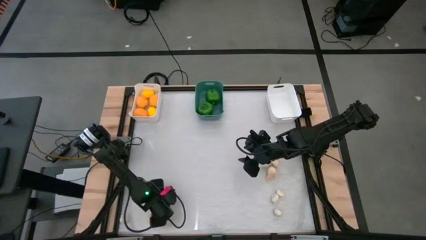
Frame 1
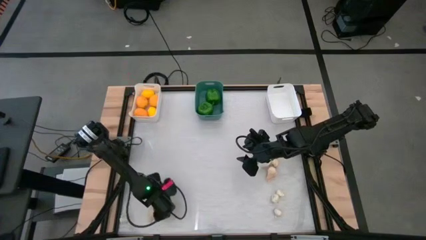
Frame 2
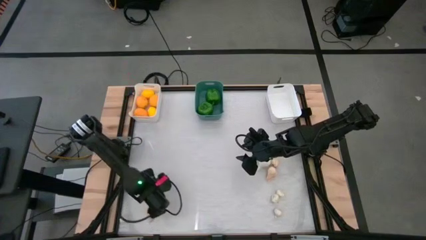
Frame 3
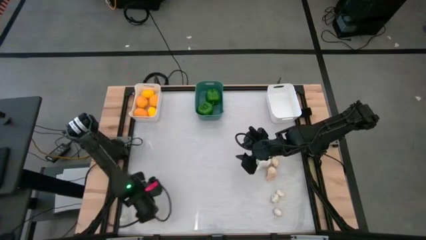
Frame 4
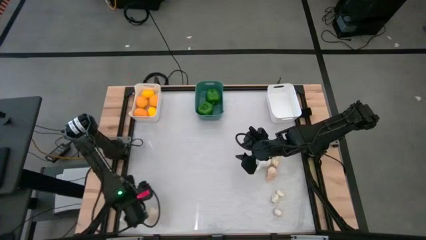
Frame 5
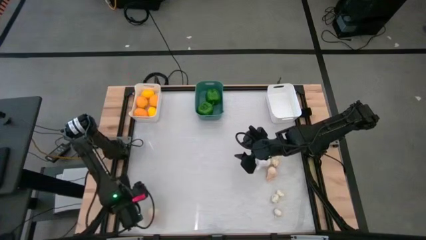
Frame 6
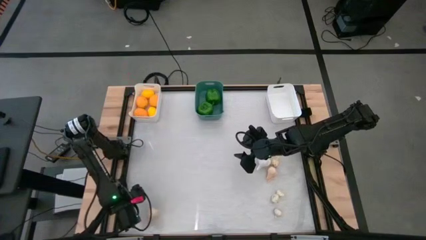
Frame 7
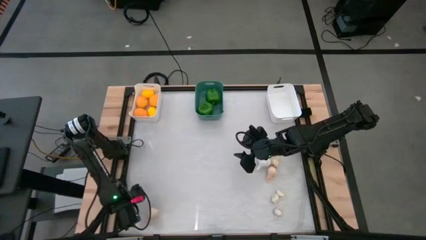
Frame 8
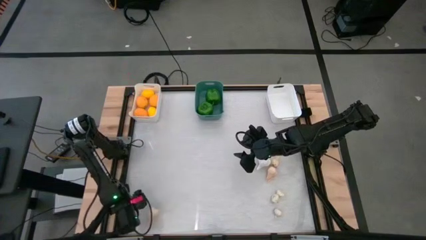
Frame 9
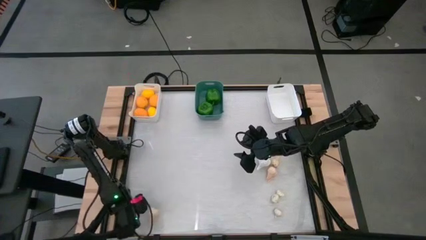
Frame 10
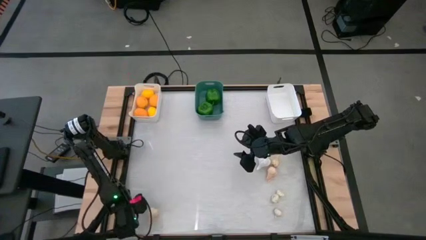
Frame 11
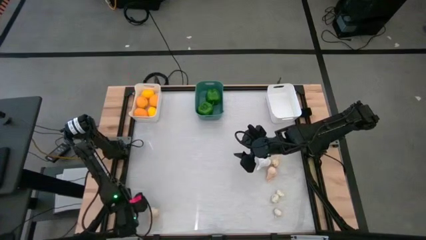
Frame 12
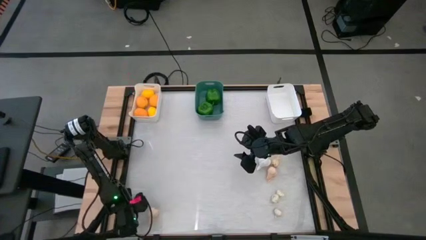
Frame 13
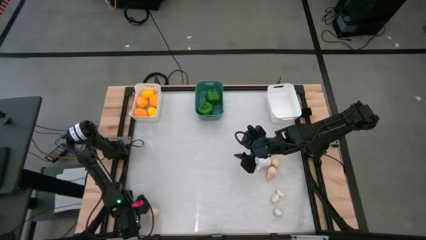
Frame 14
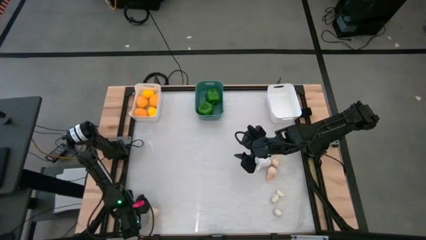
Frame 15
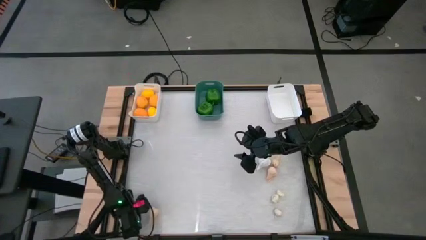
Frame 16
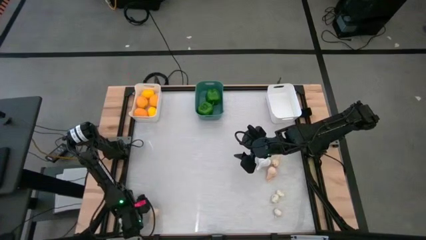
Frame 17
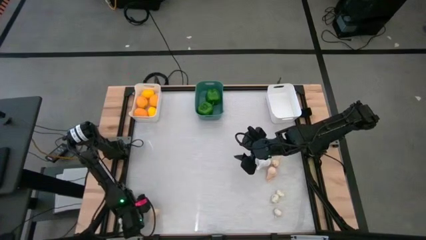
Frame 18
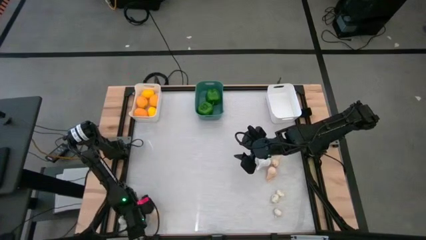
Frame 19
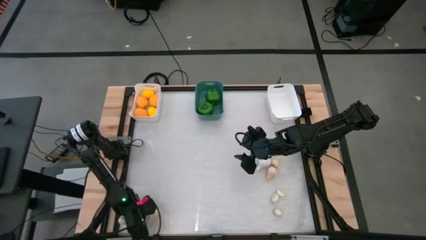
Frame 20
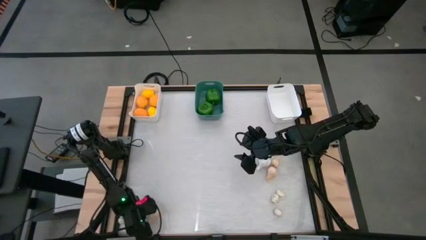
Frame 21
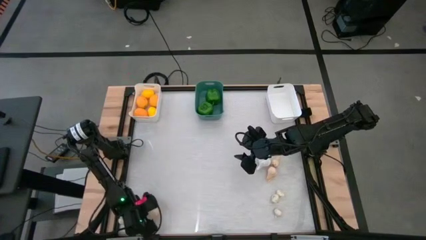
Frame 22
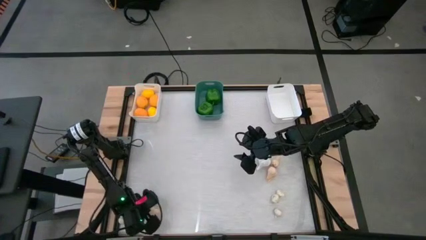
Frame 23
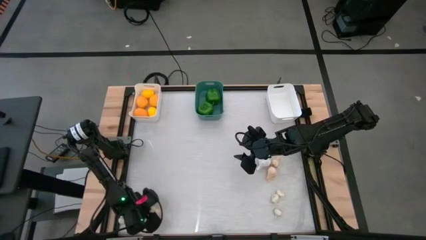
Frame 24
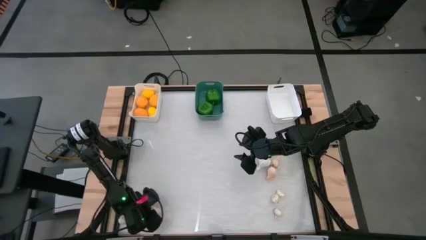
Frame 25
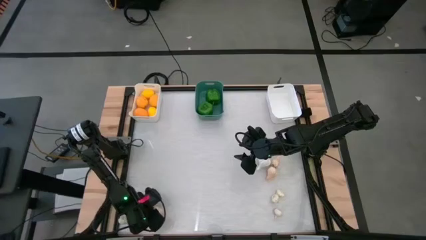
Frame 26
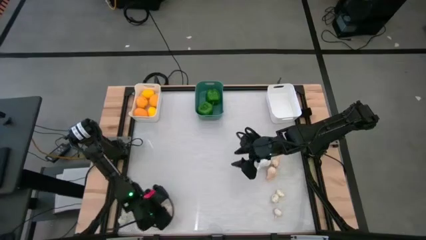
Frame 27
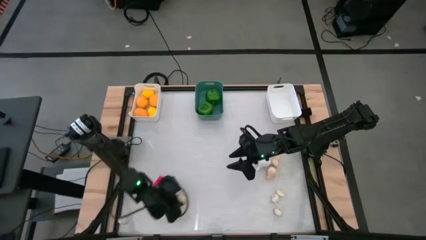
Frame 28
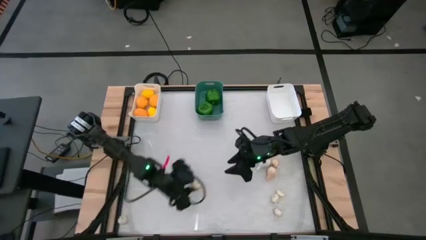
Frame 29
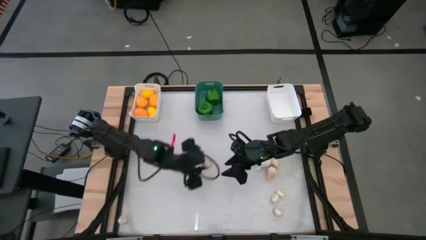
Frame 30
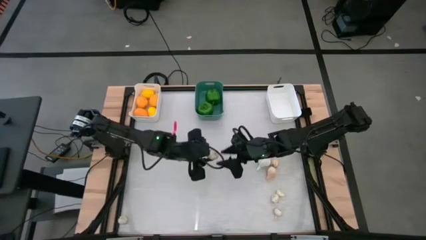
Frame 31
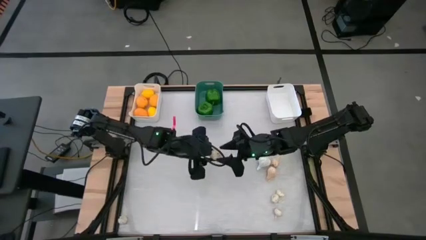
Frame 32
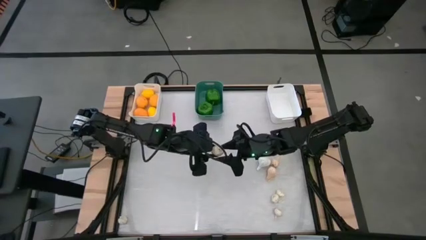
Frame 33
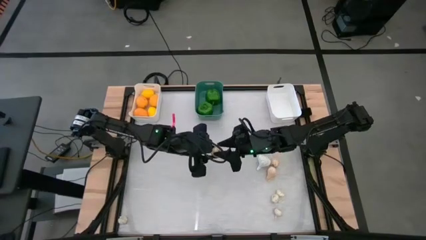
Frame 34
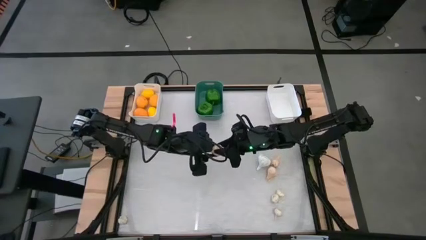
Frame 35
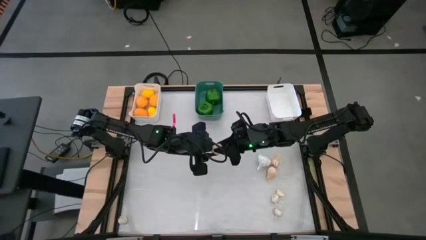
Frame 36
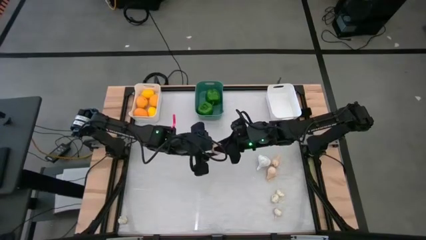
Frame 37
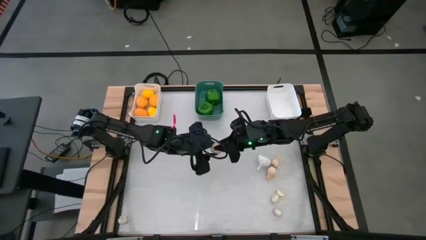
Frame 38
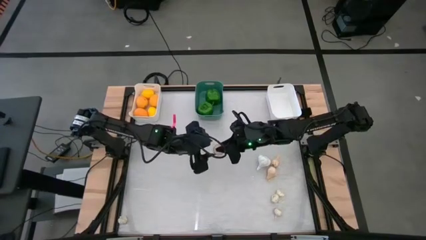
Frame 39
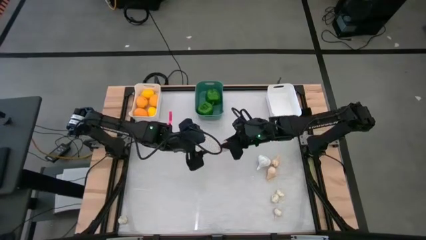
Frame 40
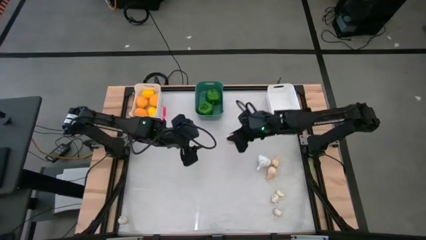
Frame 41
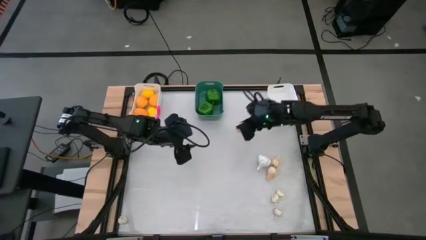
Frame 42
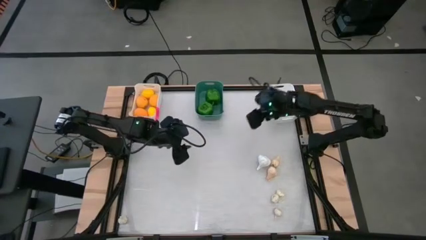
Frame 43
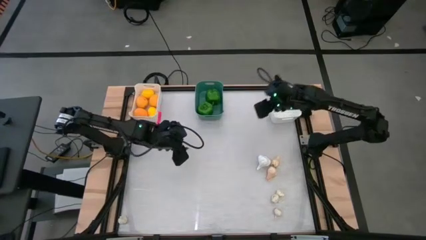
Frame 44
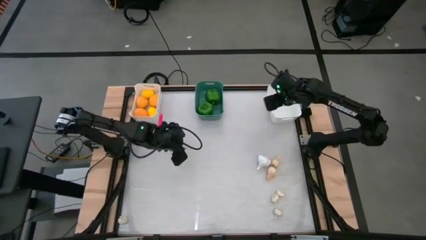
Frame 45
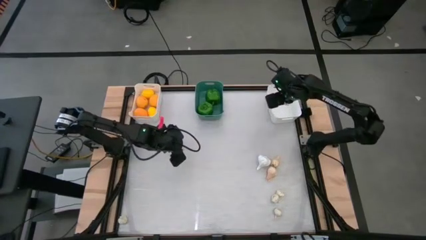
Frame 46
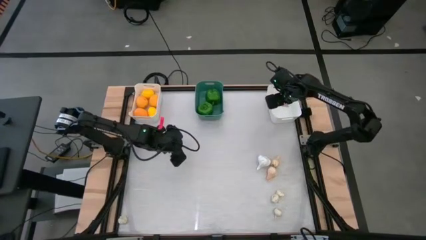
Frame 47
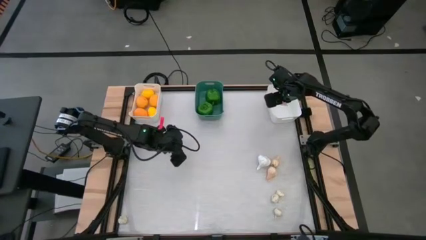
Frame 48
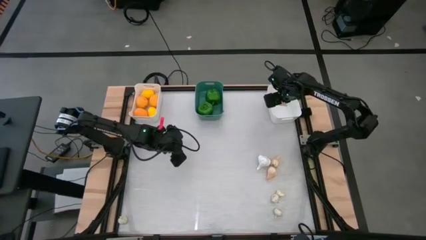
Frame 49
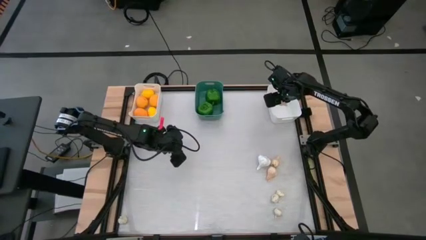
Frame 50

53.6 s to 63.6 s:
Task: Sort produce into baskets
Put the bottom left white garlic into the right white bin

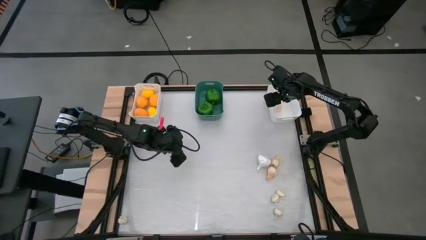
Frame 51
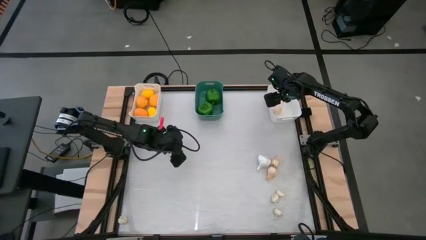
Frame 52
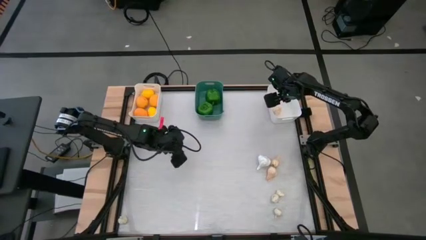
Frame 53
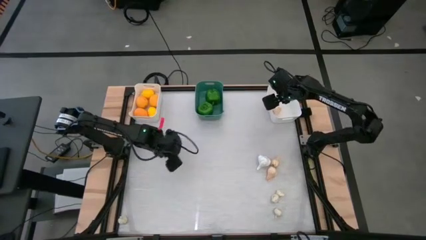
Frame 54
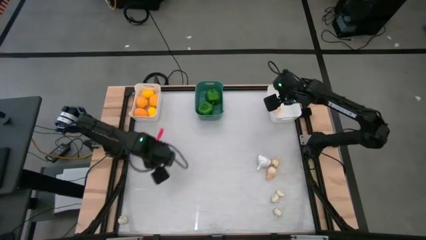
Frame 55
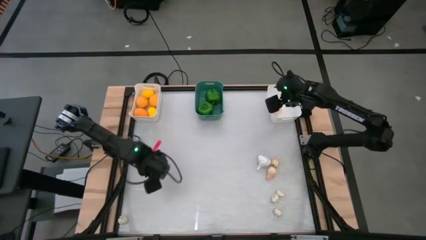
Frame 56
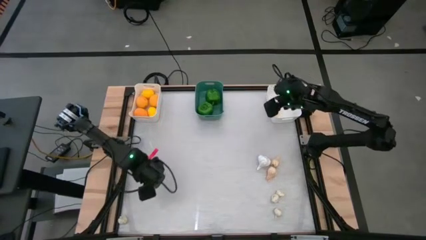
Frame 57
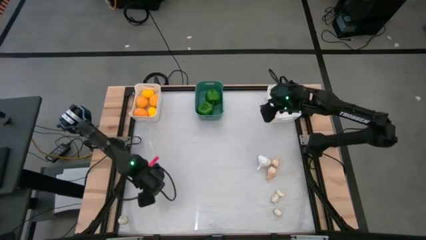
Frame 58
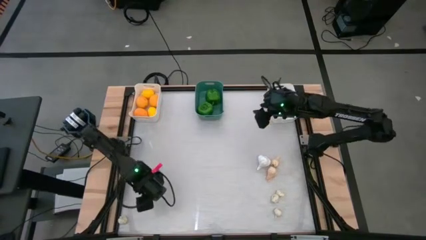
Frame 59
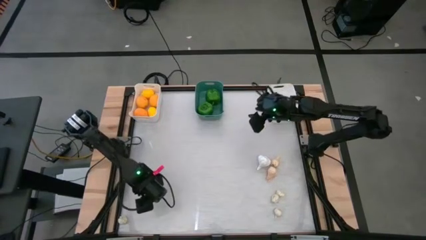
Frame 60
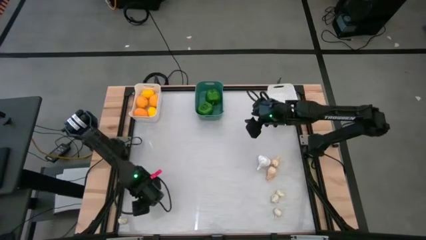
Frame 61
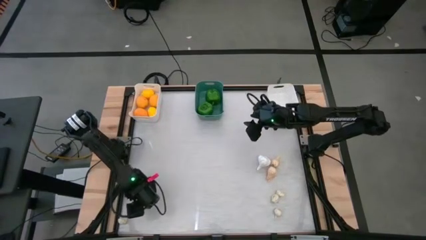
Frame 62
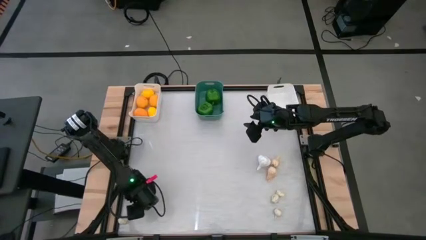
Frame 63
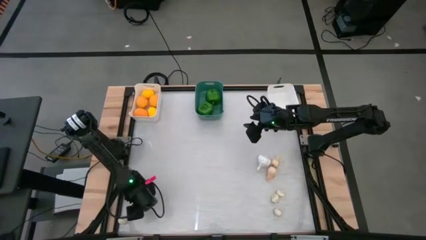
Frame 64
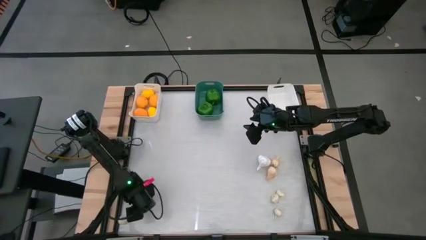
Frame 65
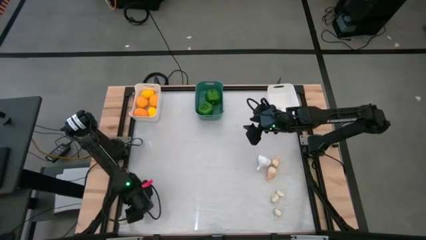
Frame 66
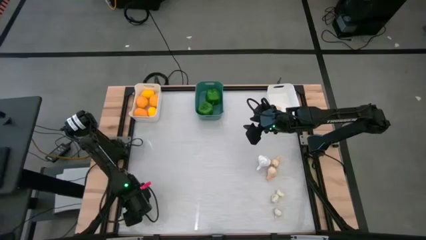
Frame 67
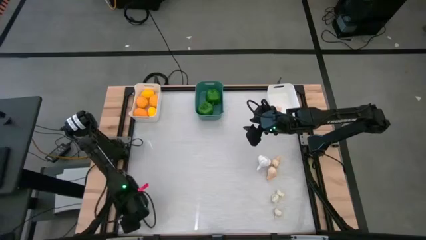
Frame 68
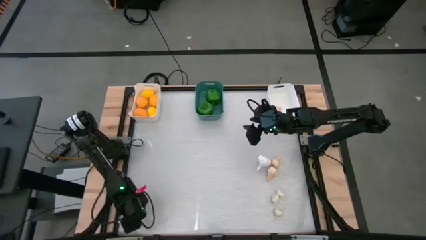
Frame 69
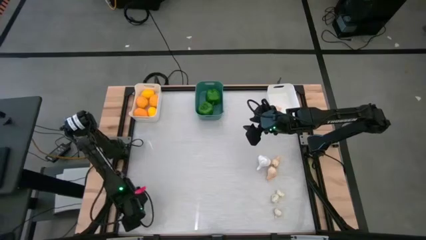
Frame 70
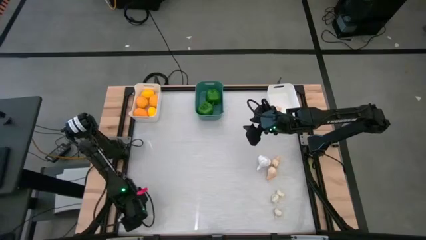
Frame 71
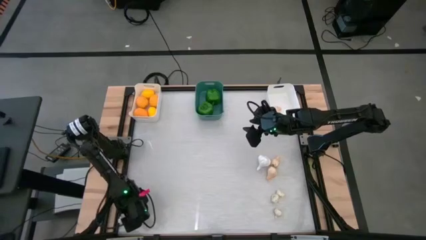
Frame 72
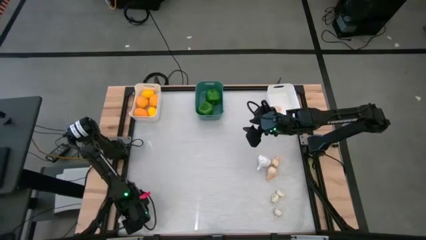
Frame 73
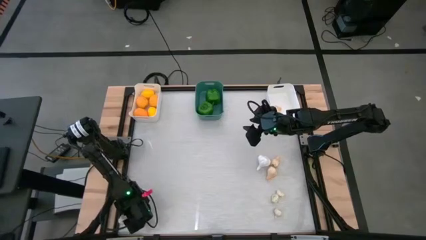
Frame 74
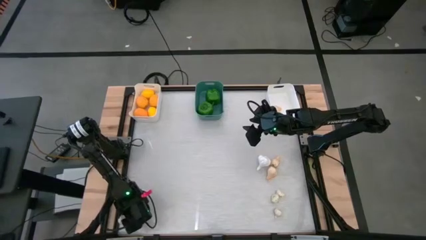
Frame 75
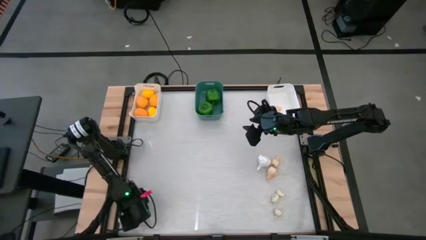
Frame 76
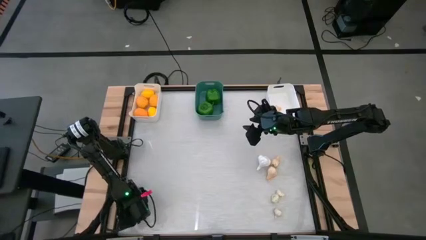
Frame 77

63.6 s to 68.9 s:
Put the bottom left white garlic into the right white bin

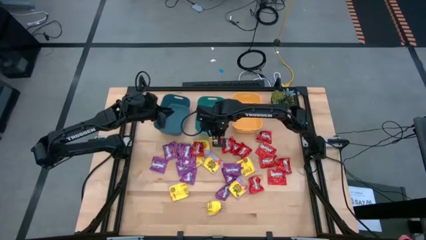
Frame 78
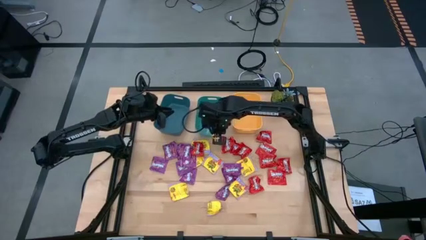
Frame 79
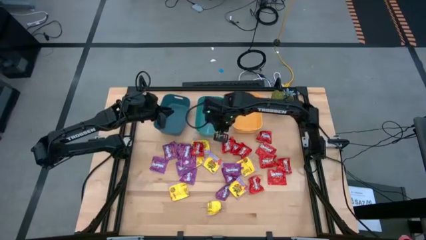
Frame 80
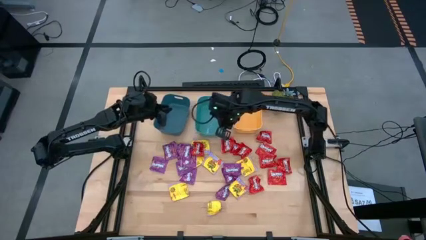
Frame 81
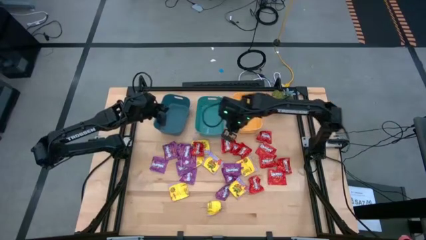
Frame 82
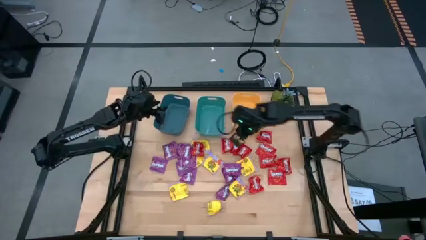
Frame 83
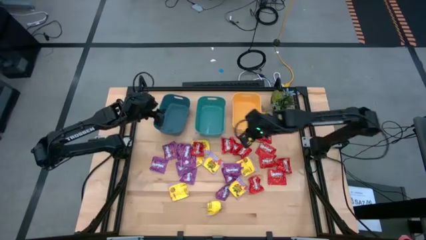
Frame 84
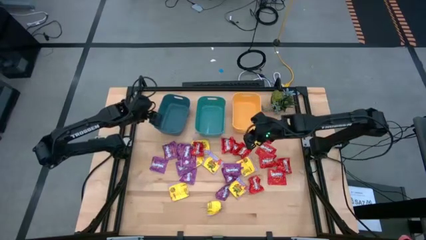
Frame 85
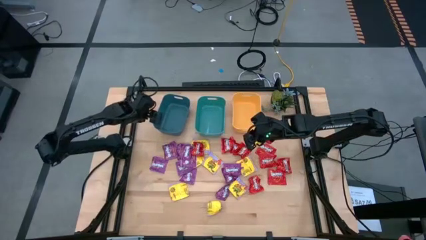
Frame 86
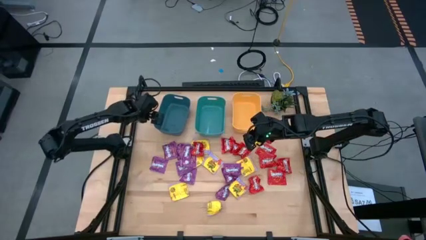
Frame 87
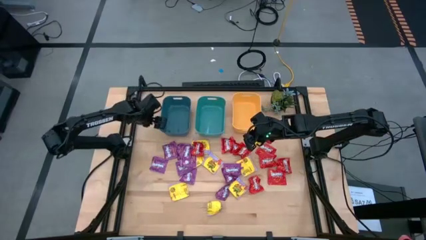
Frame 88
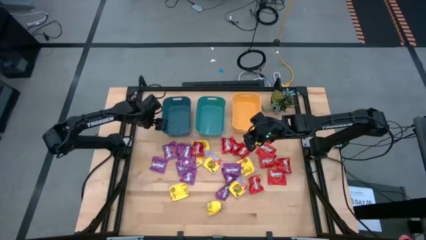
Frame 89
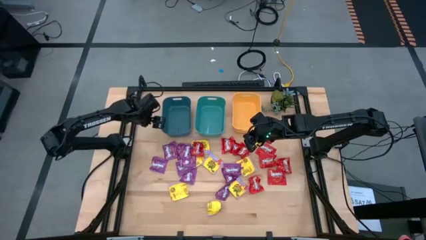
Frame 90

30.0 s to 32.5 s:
Task: Sort candy
Adjust the blue bin
